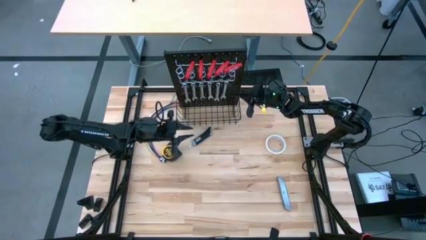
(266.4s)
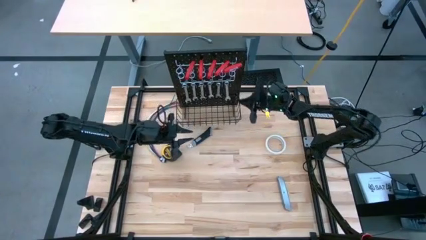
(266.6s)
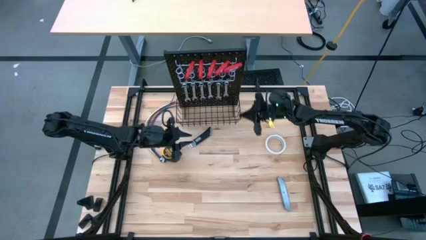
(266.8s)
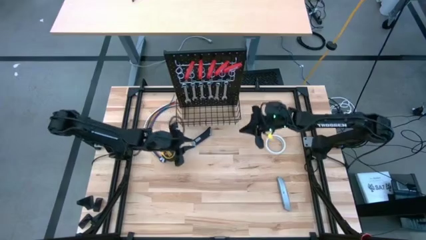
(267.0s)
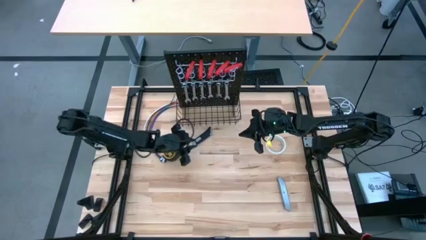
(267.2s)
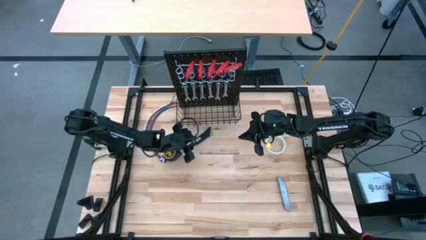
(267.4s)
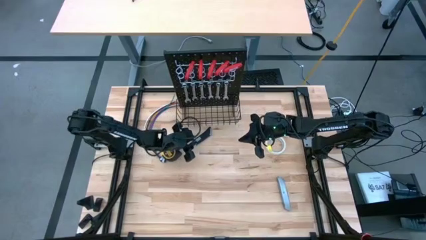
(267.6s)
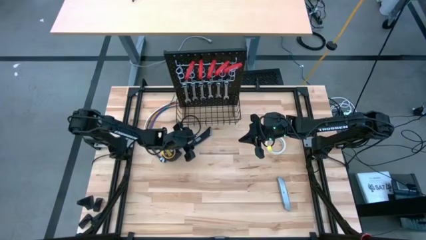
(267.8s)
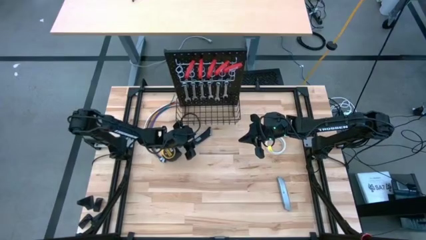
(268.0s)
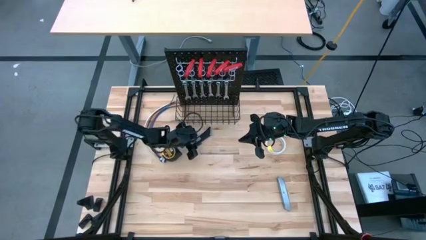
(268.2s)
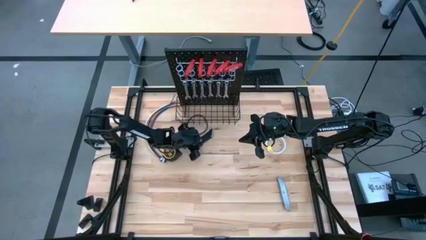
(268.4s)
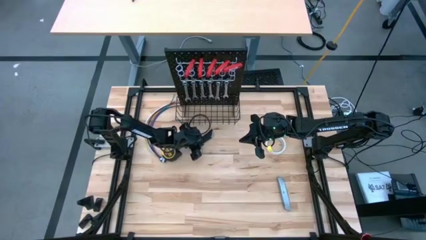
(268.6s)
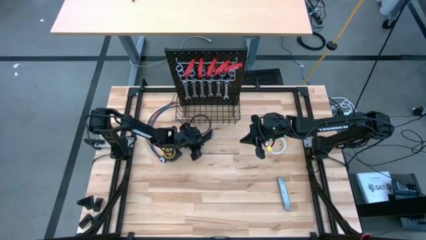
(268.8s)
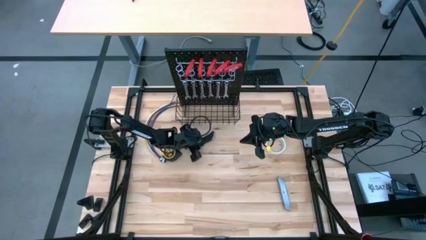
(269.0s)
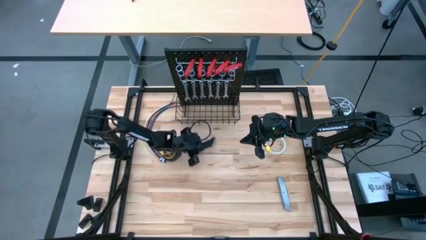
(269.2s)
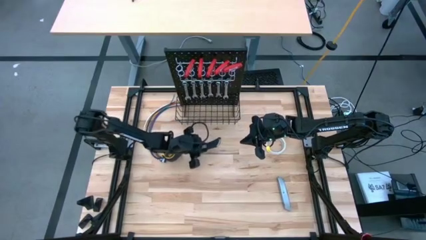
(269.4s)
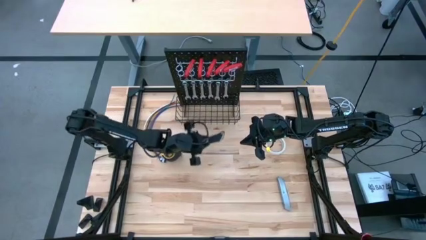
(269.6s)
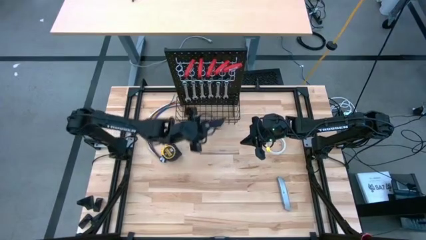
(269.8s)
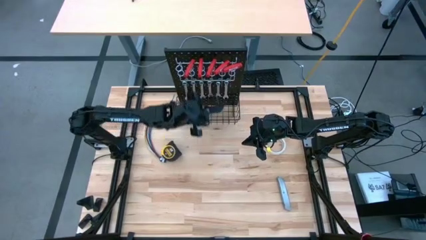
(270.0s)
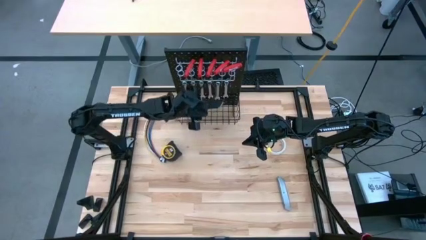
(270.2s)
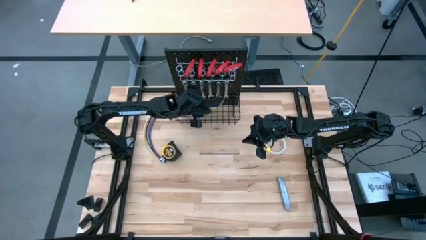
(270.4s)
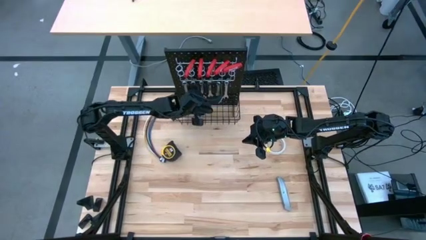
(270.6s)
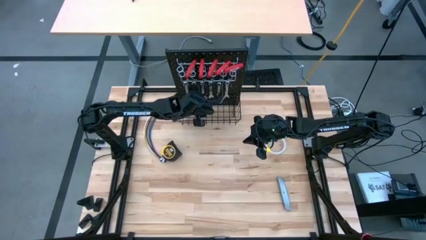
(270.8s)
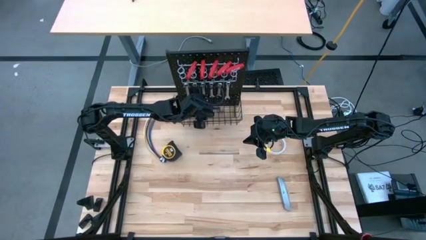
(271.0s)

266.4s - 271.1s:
Task: Hang tools onto peg board
Put the black knife cutter into the wire basket on the peg board

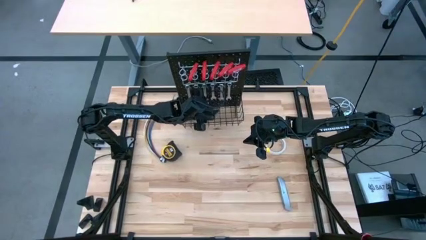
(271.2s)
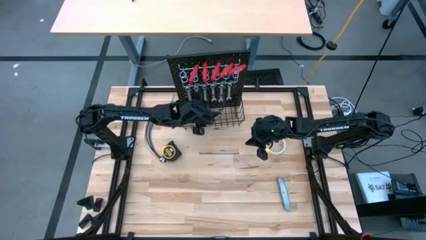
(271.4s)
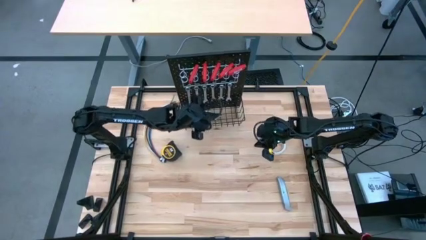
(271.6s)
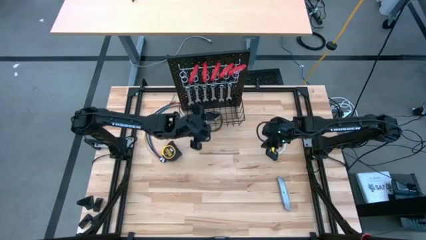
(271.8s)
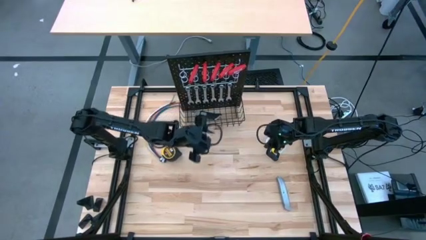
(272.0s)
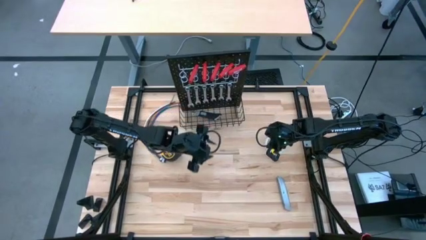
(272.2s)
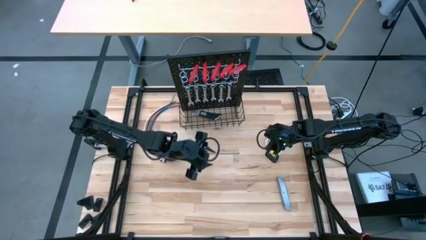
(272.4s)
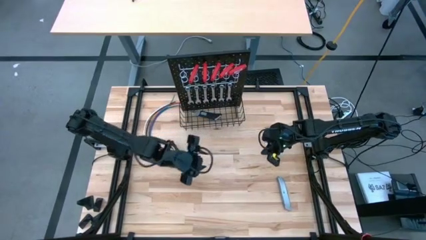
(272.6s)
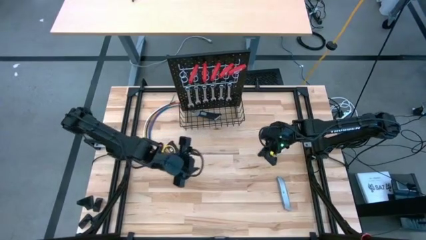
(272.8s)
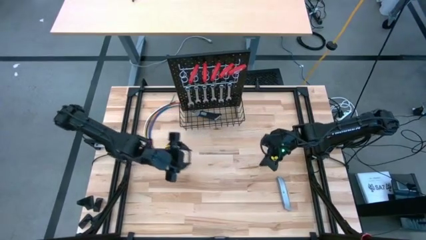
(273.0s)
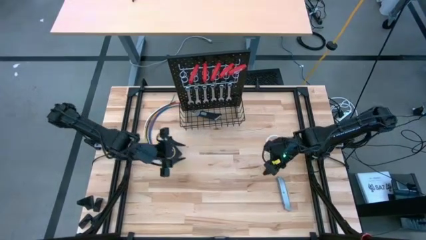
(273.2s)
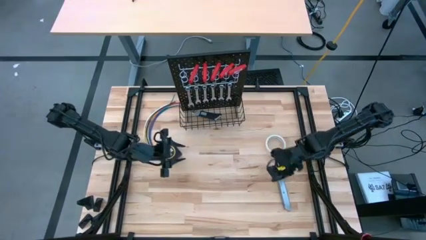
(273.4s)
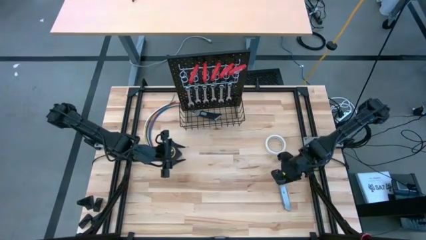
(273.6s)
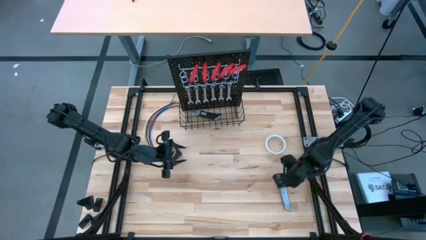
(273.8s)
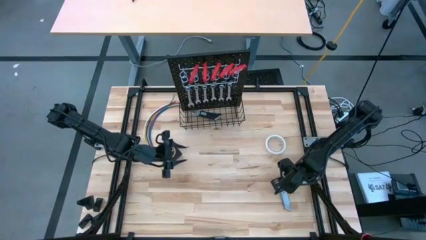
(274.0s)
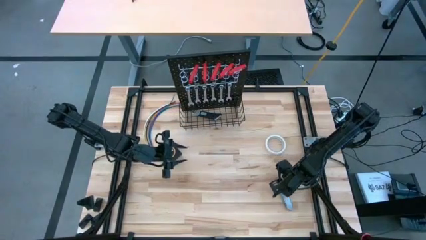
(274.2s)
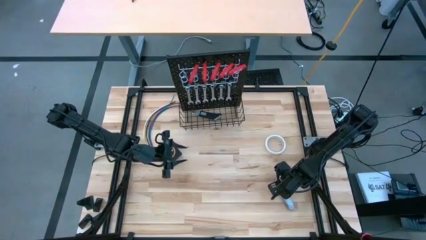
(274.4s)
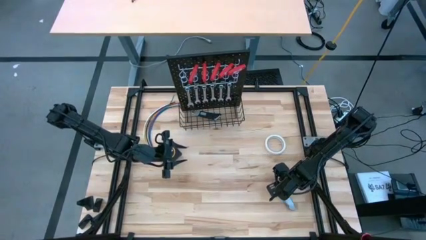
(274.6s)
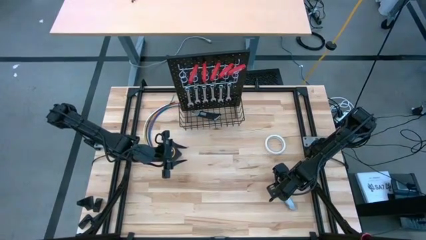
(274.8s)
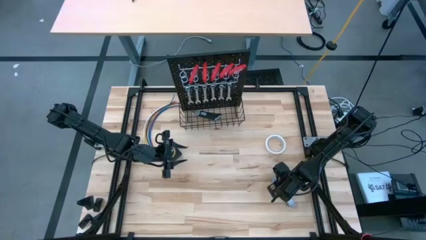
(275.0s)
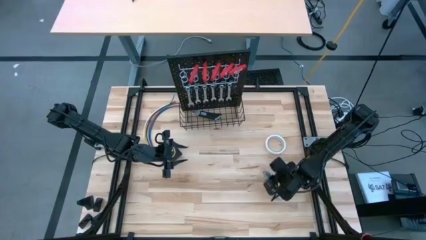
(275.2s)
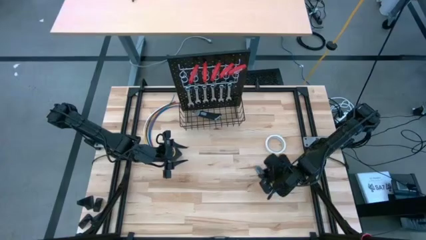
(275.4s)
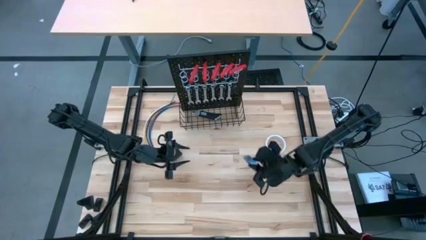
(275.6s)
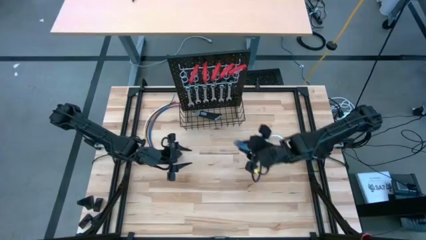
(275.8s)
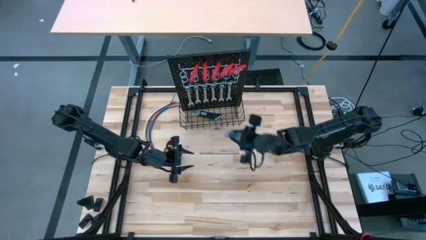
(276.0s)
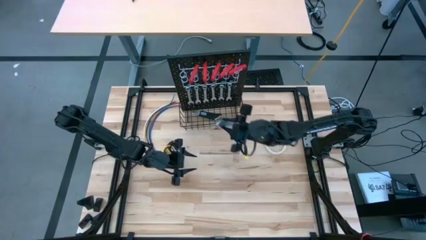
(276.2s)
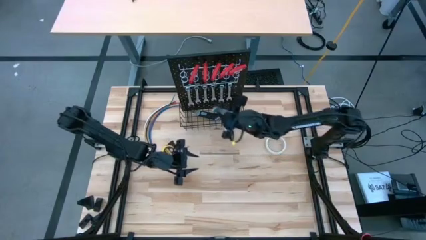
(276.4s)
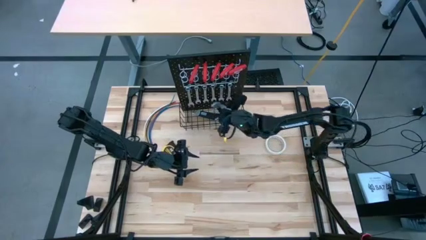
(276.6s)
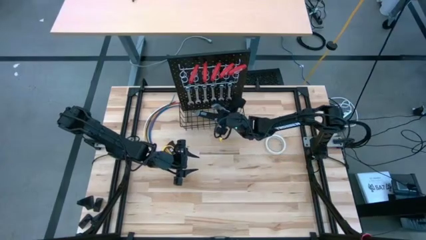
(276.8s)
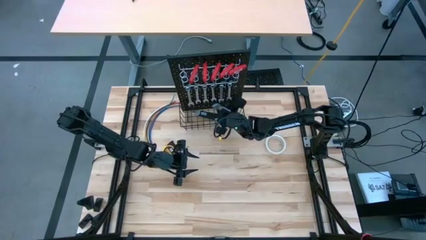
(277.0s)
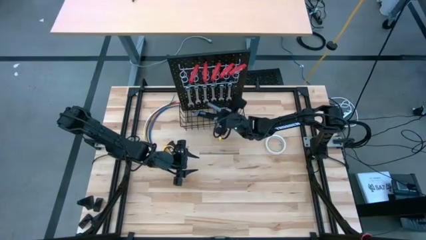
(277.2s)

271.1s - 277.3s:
Put the gray knife cutter into the wire basket on the peg board

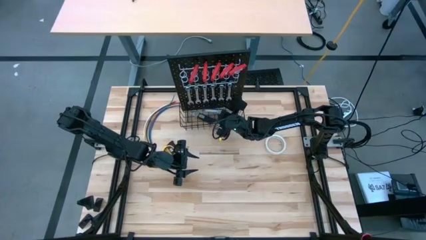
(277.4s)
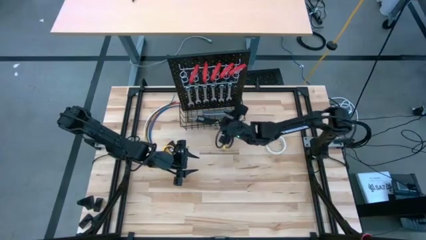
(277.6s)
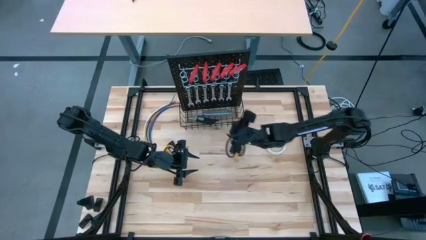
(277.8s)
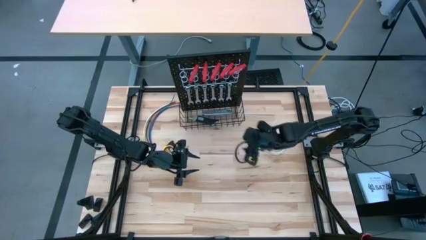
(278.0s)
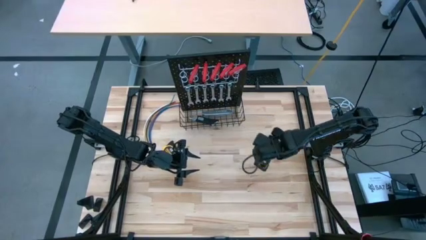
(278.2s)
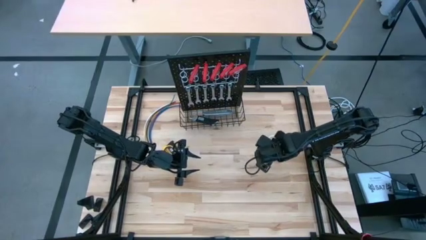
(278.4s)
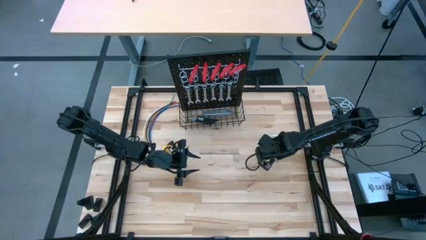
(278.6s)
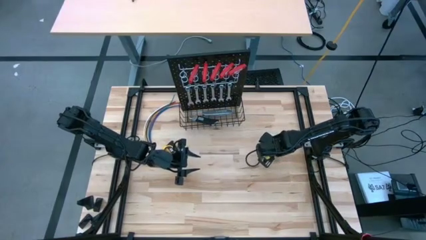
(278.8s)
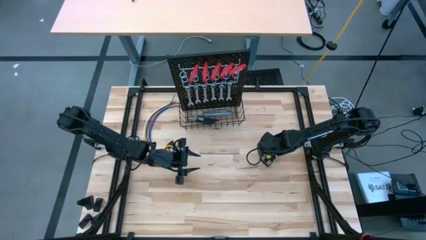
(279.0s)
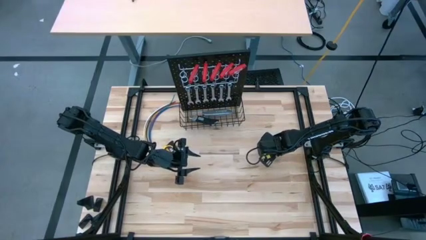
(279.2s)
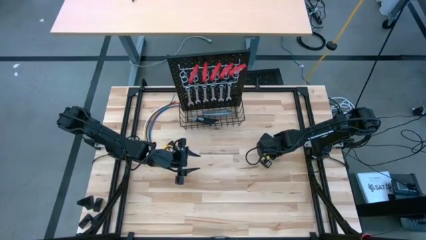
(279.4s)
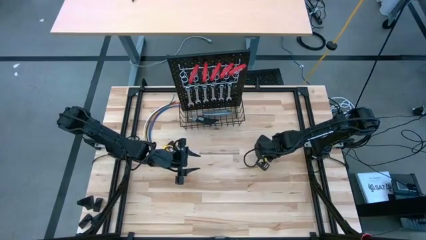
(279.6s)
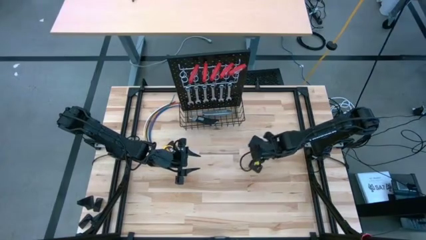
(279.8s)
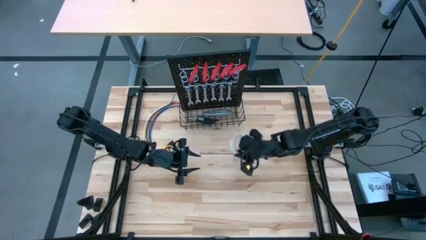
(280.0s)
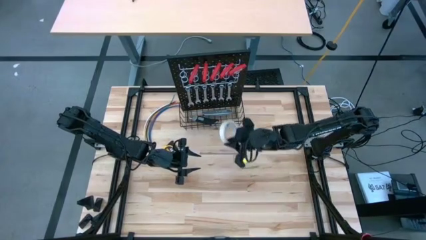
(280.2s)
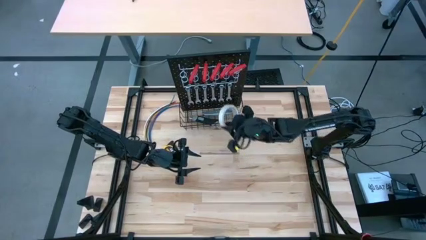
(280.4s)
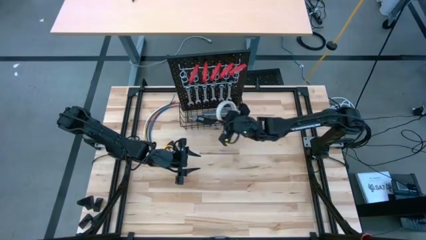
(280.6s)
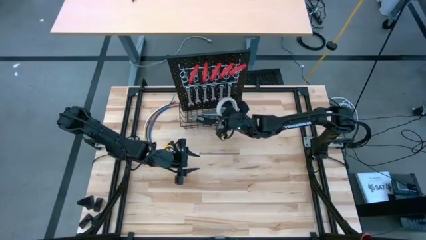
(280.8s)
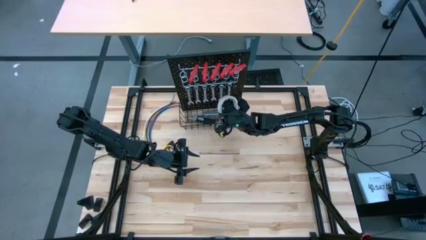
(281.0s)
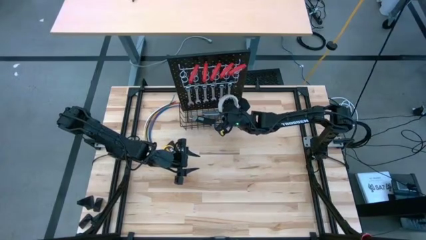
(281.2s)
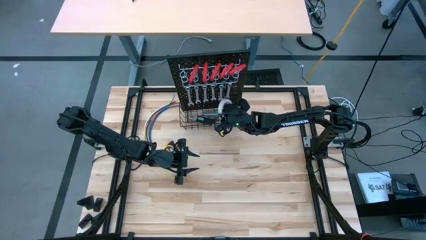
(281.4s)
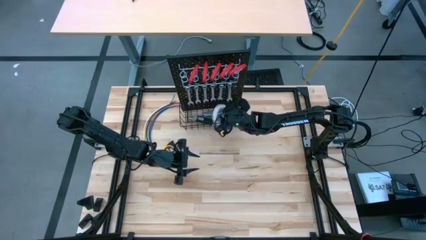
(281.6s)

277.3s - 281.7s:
Put the tape into the wire basket on the peg board

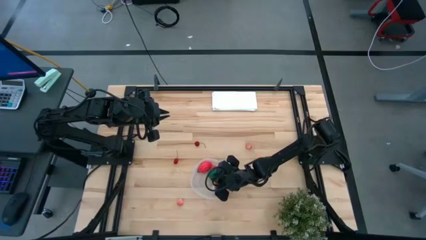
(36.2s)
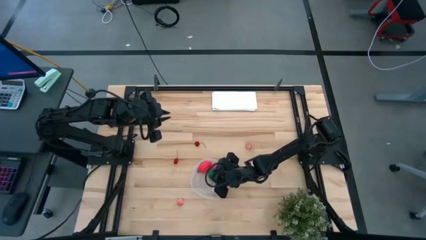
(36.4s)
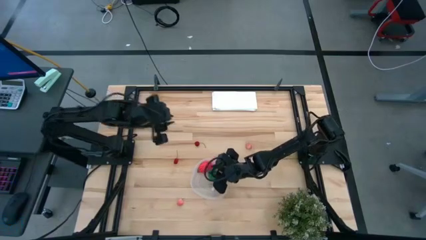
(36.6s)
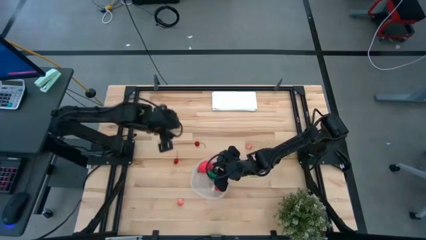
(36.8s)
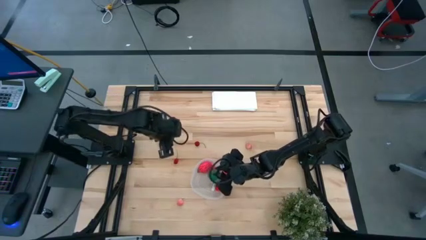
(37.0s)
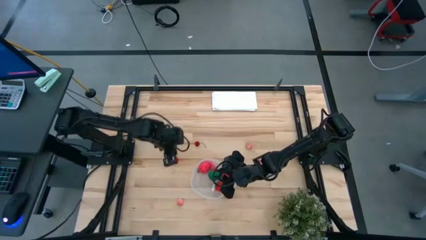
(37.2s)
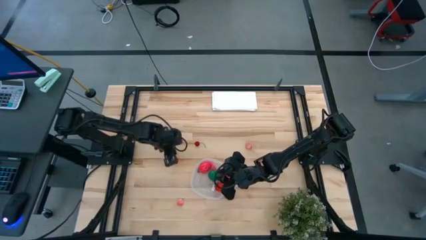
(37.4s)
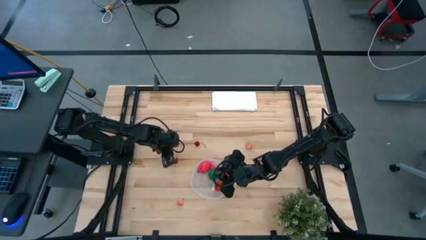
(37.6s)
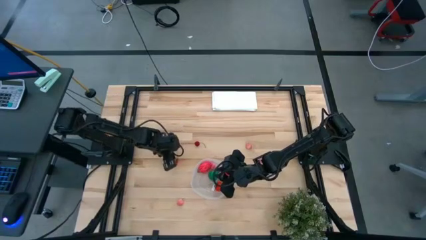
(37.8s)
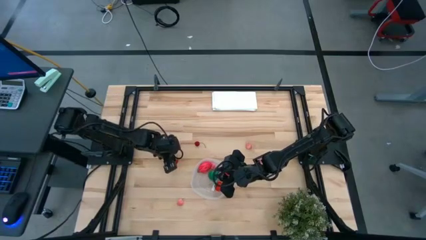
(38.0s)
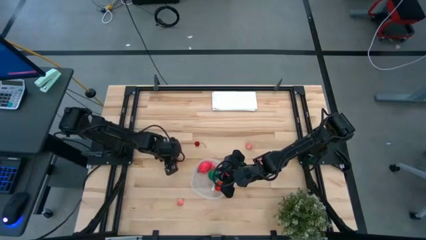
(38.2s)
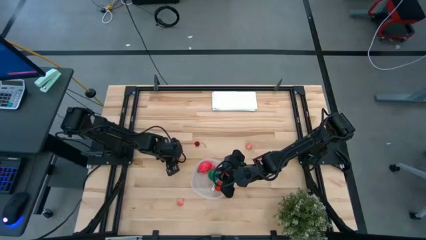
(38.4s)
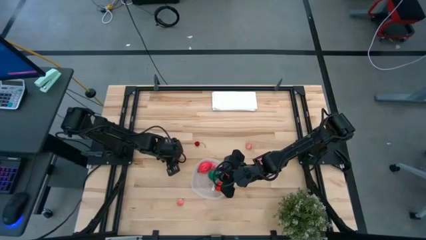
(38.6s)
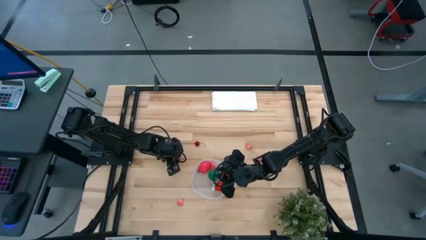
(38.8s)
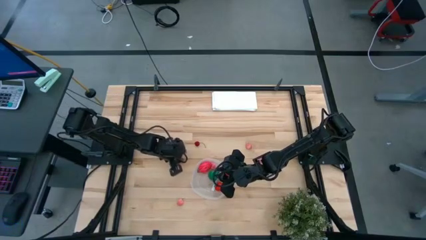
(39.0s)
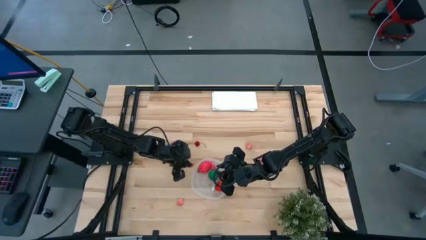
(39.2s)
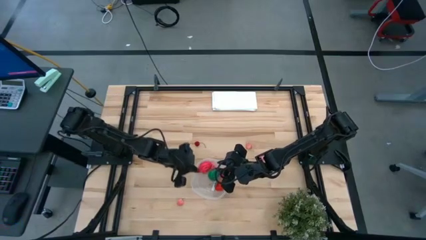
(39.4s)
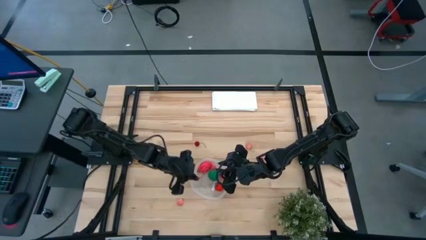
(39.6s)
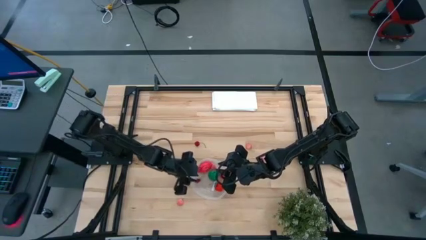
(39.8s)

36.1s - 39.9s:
Task: Pick and placing Produce into tupperware
Put the red cherry into the transparent bin
